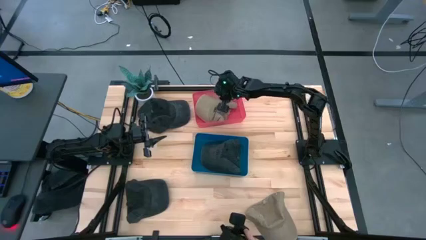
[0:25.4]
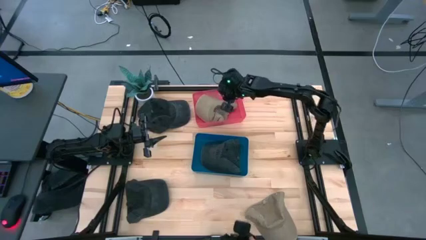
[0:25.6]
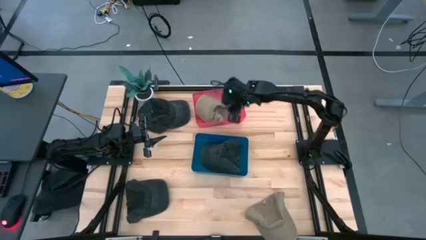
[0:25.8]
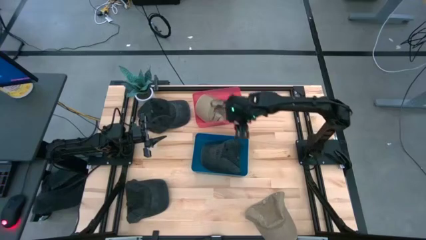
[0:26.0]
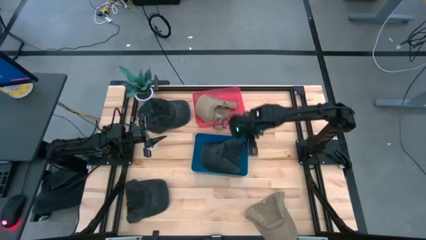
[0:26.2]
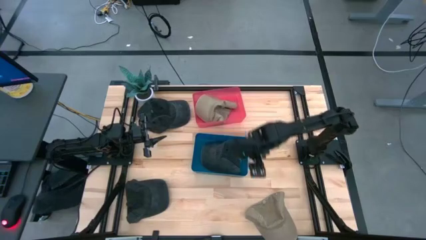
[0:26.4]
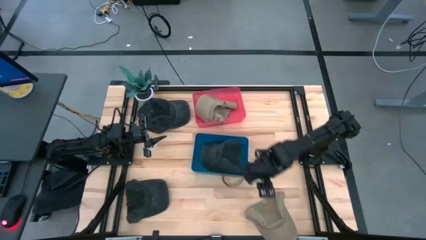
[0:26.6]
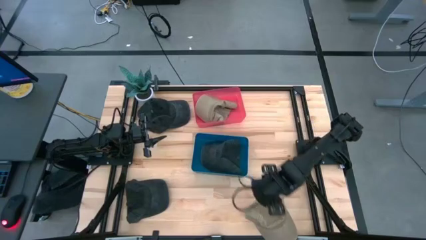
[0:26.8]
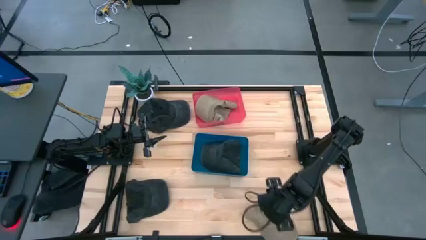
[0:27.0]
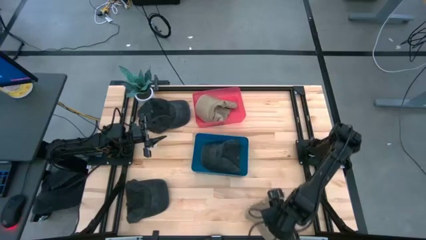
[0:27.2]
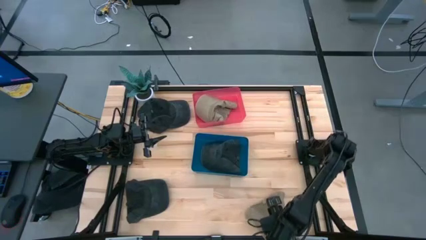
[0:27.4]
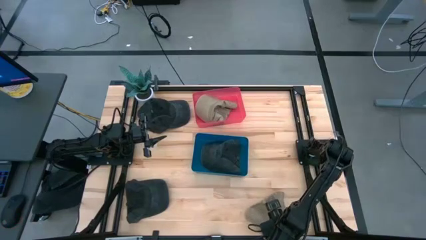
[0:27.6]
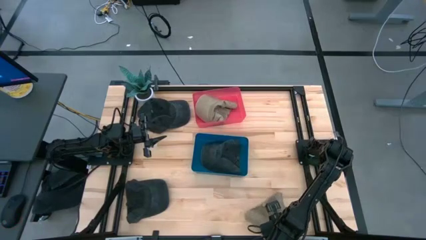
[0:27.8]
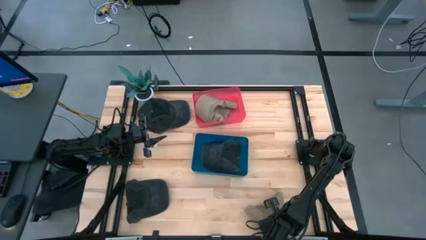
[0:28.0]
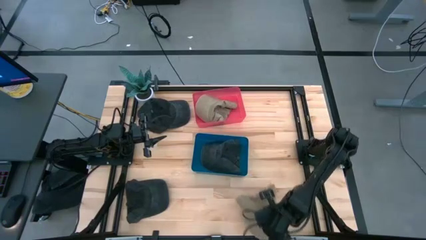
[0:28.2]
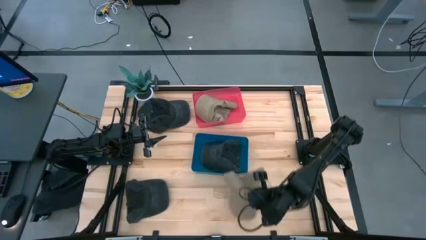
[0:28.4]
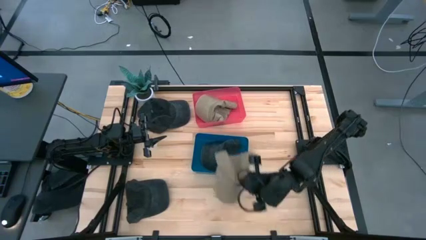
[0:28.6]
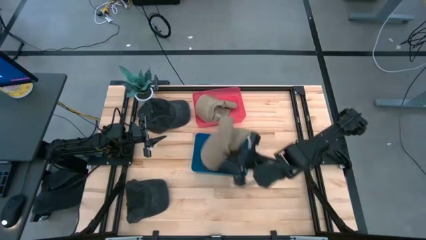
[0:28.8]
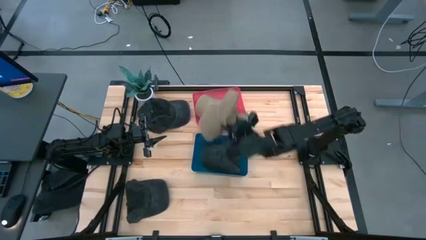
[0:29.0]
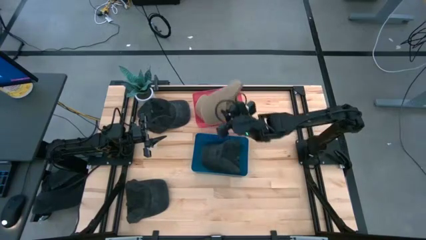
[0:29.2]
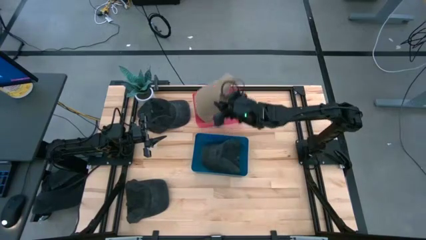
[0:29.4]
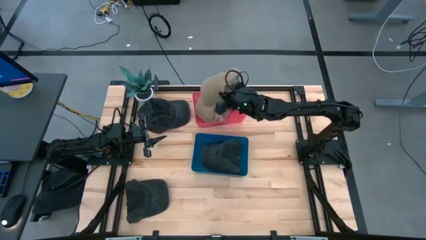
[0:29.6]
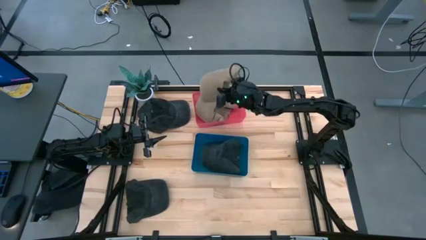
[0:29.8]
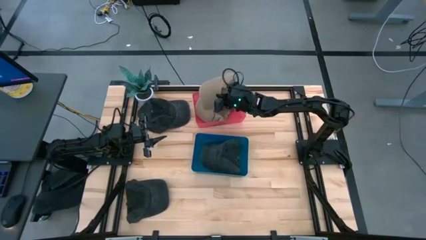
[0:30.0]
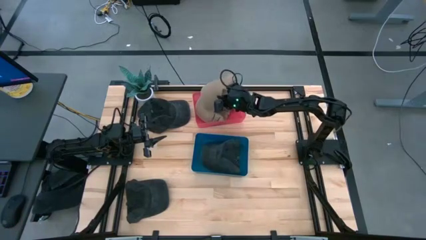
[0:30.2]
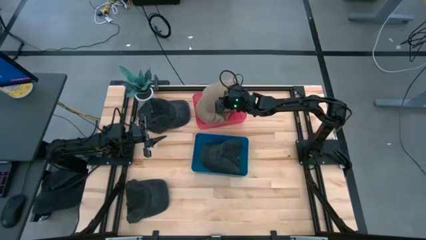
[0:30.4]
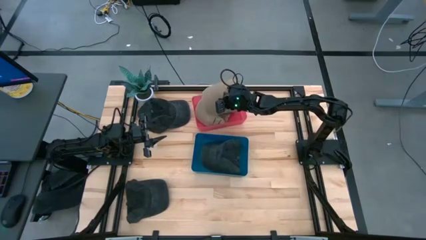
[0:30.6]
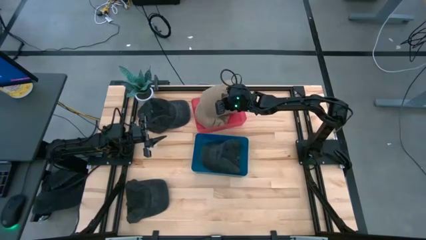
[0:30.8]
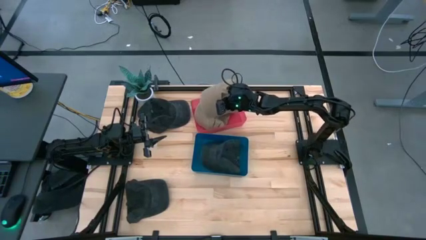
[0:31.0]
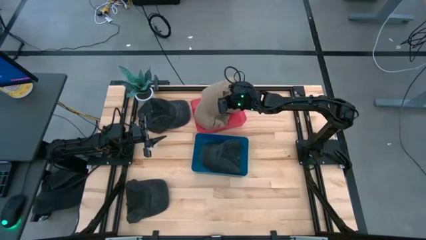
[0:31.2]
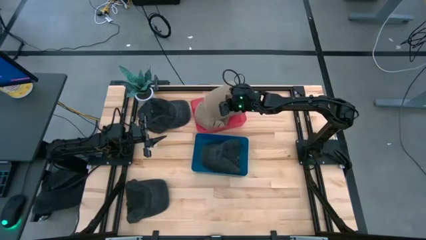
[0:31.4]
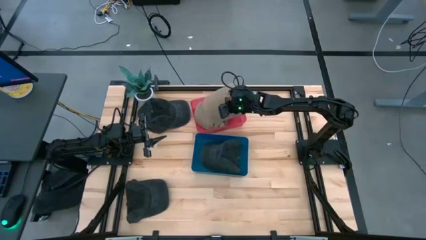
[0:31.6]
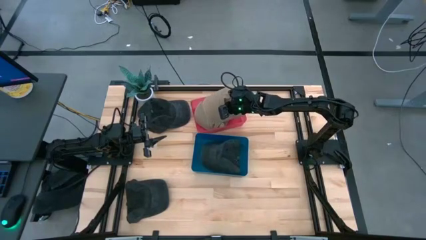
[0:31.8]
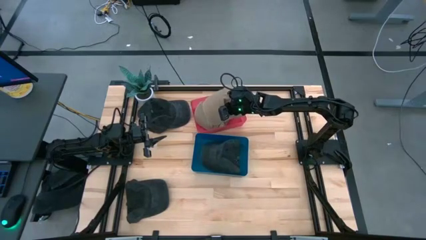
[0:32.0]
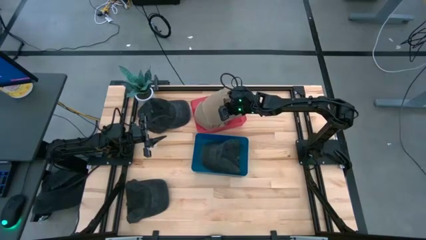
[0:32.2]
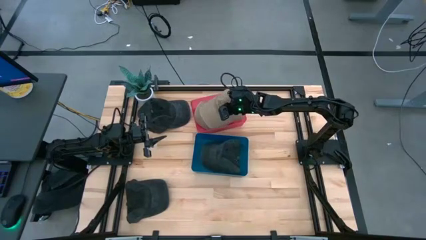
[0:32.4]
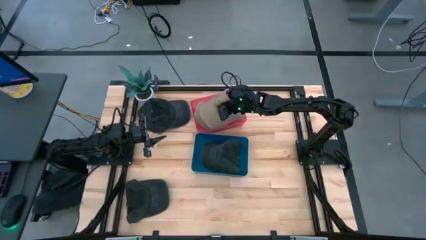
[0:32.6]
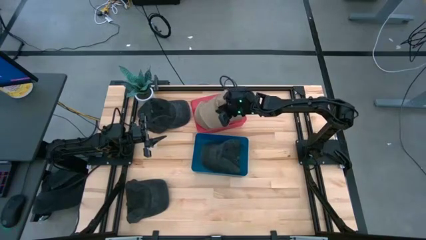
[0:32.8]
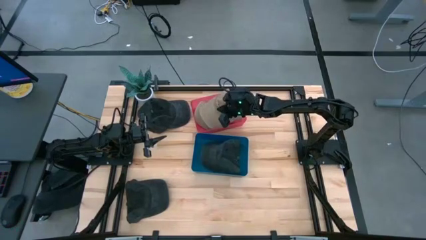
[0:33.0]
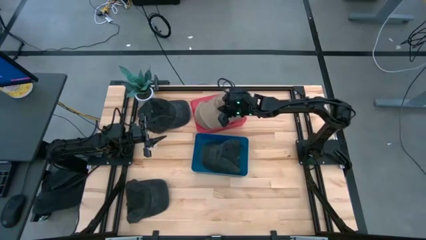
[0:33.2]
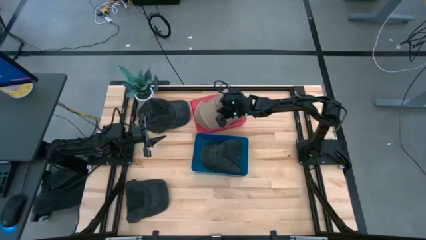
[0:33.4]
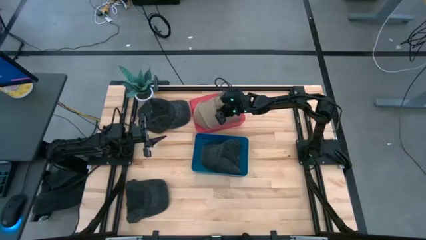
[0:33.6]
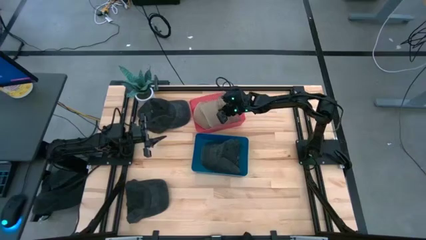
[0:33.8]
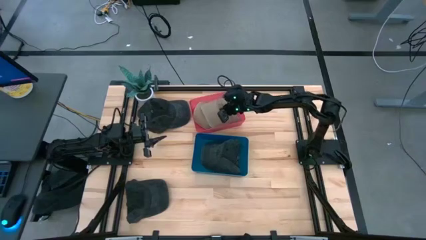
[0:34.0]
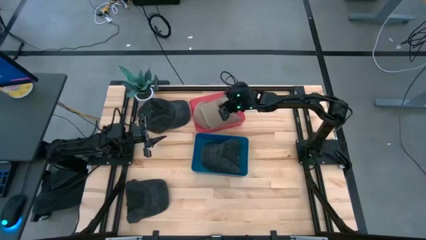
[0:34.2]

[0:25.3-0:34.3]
Task: Pick & Place hat
Put the brown cap into the red bin

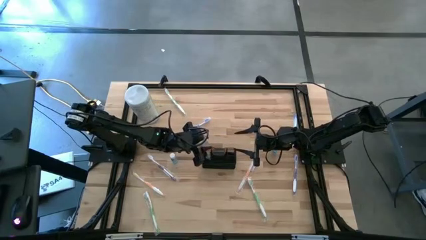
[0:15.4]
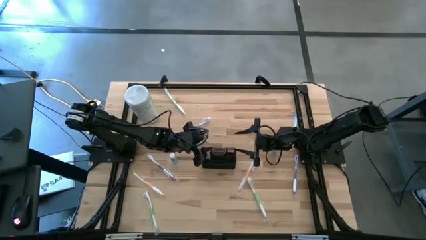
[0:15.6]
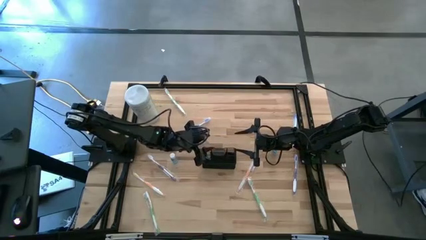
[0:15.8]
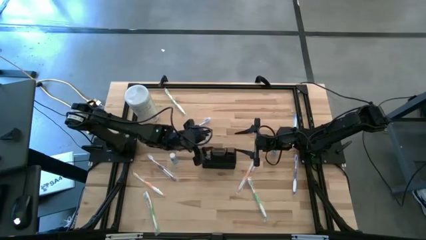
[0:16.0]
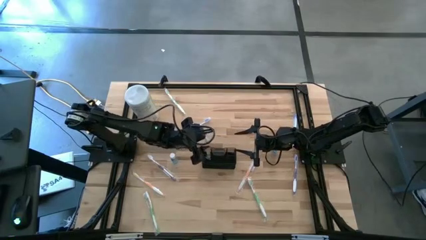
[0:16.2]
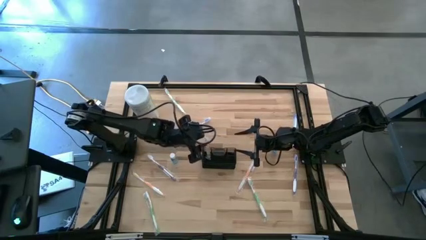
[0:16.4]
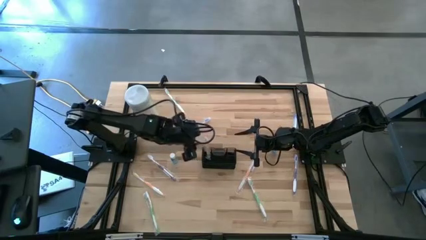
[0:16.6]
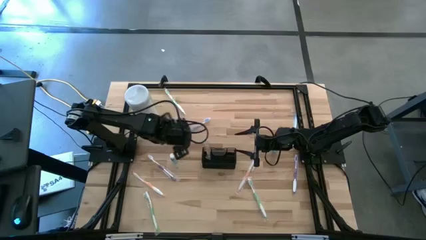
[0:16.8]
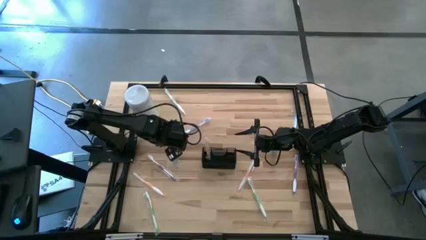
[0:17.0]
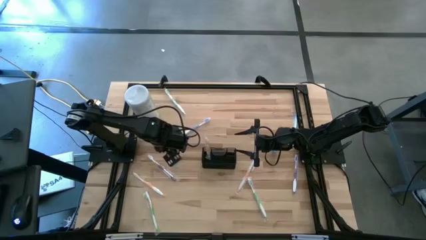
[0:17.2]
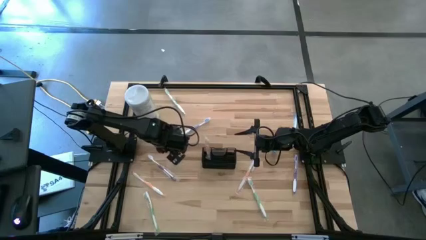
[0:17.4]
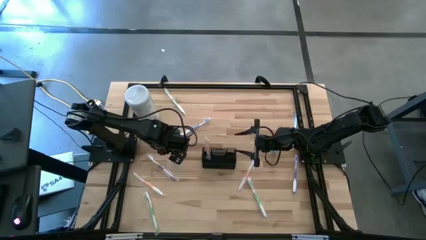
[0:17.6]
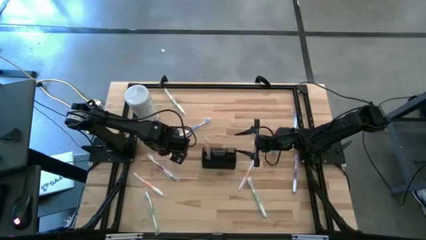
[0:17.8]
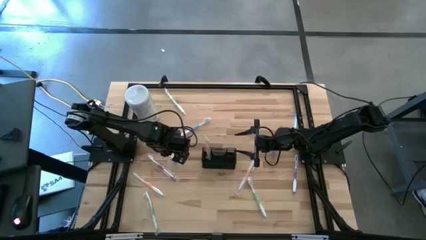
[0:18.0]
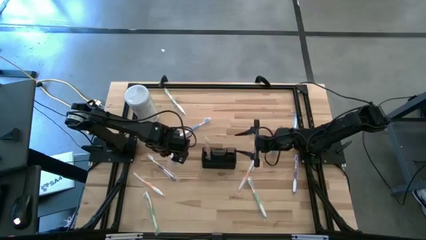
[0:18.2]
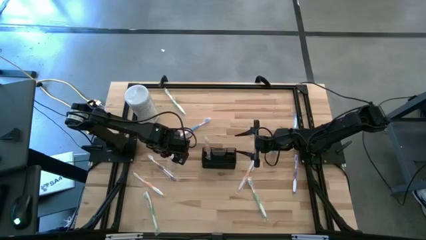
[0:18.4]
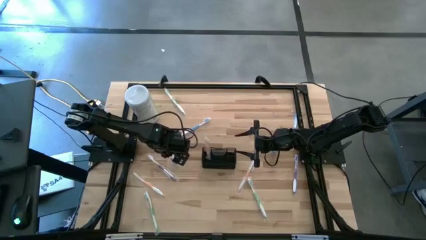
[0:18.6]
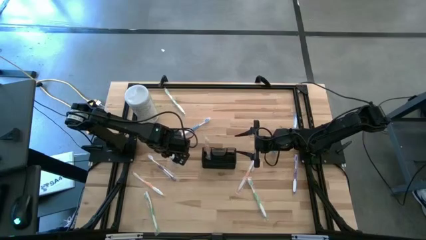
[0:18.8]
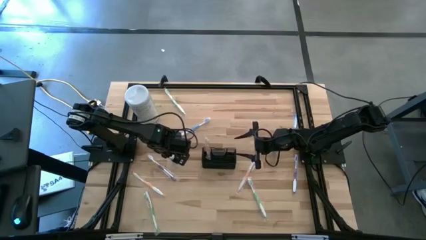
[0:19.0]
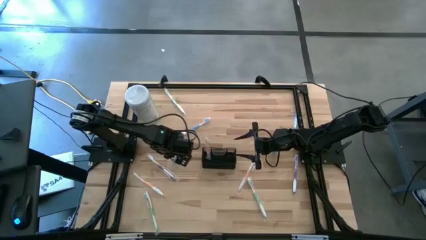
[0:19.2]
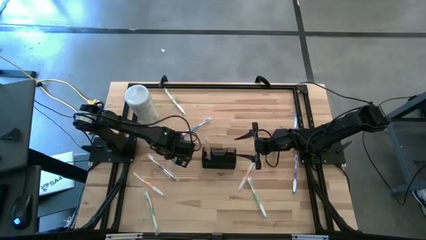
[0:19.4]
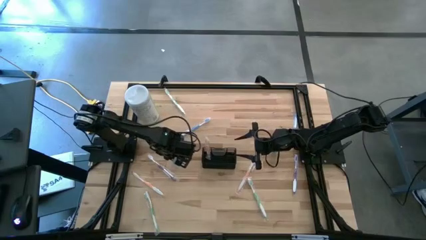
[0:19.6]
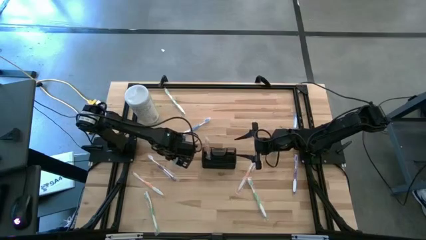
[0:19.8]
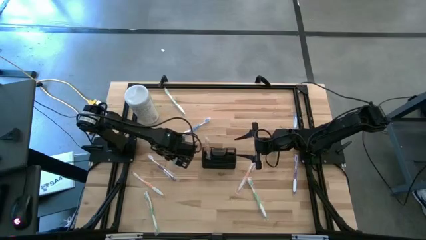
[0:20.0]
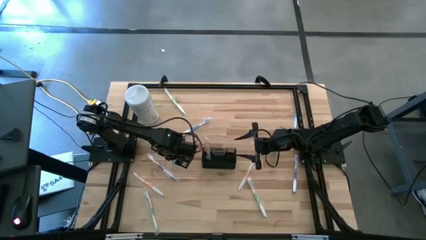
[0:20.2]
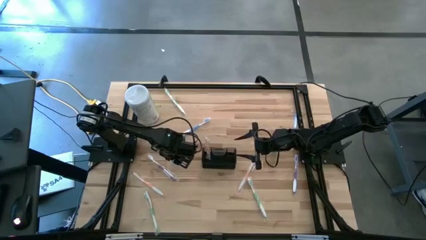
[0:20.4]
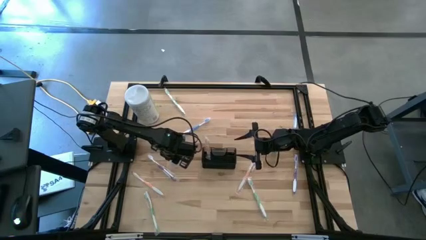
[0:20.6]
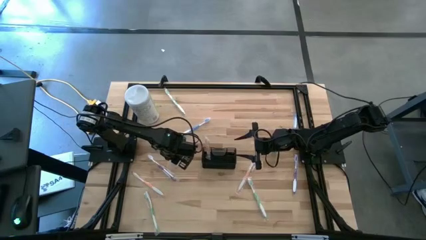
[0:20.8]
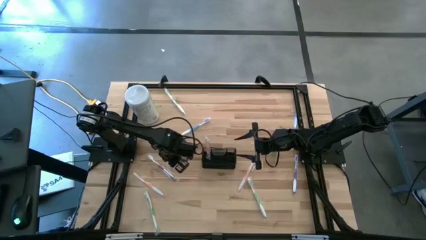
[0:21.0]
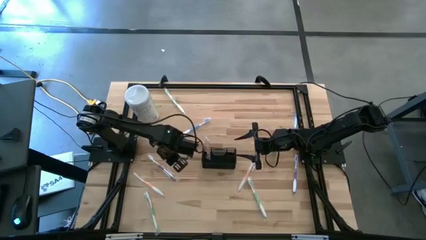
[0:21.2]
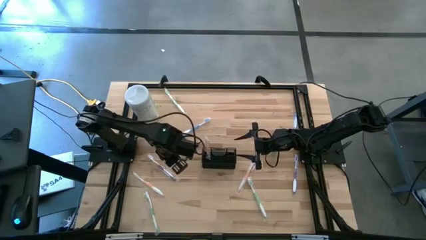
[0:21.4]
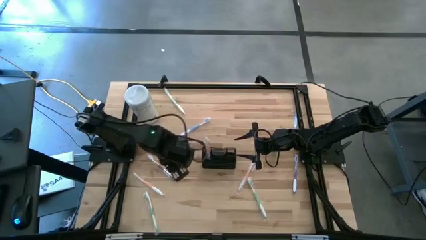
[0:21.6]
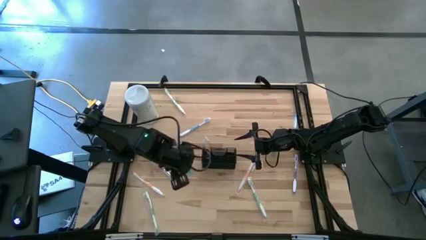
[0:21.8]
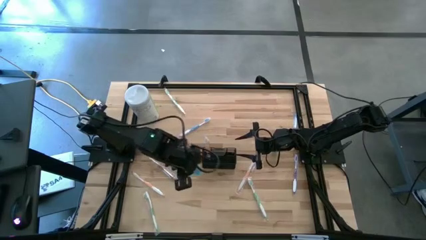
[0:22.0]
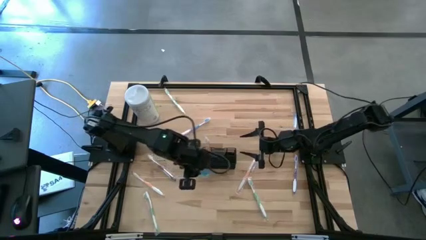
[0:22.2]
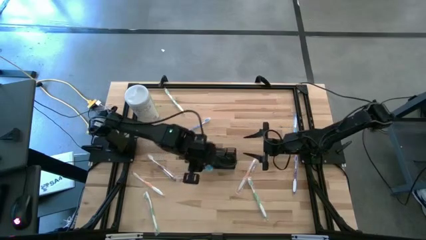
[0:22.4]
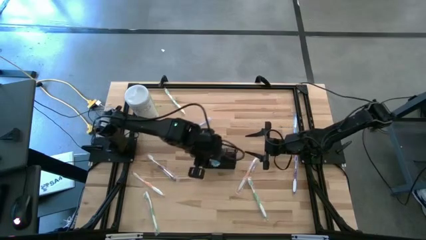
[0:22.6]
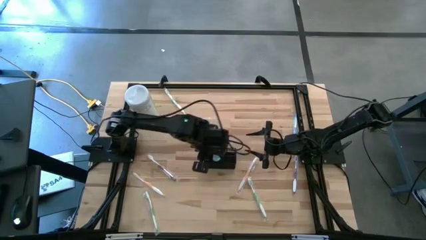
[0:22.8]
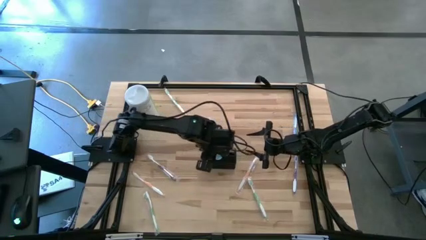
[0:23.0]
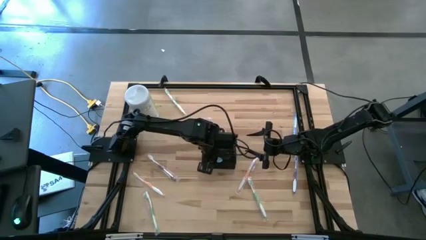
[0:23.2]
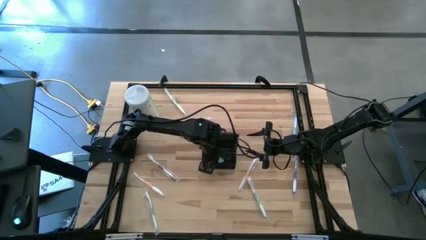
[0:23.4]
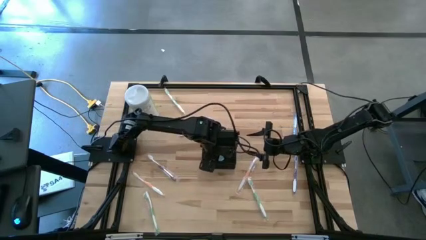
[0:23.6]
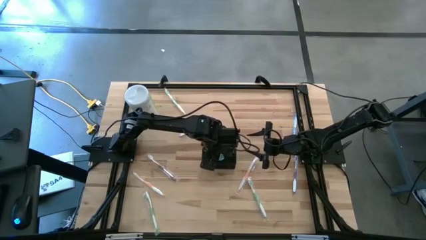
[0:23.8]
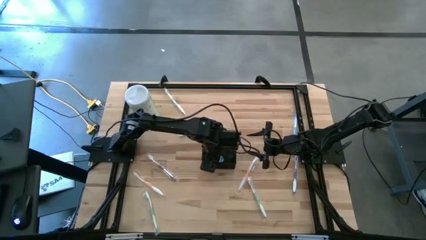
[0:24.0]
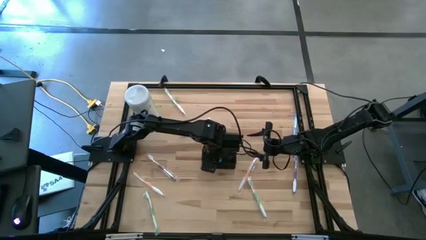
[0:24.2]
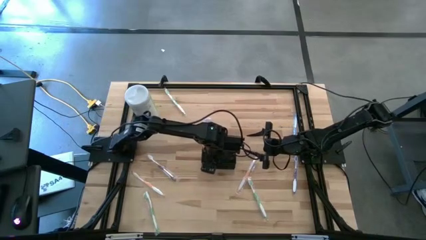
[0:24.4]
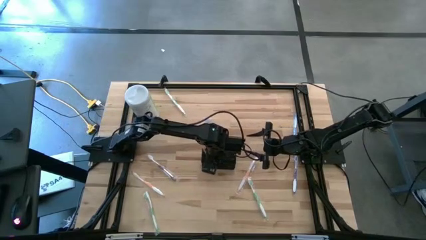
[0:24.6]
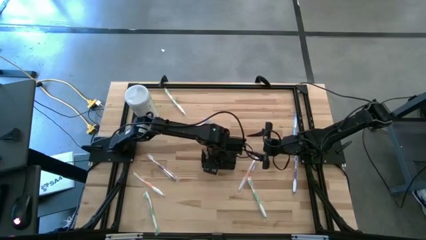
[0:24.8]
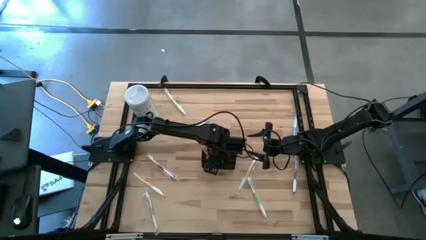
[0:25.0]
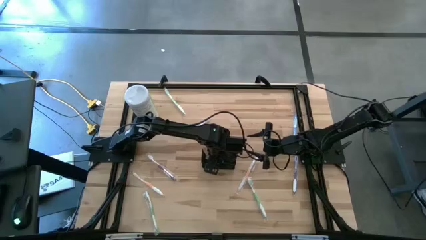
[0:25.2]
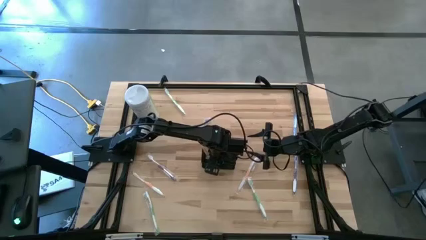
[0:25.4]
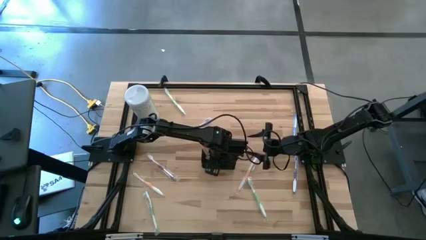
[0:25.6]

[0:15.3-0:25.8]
Task: Pick & Place toothbrushing station
Put the left blue mouthwash bottle into the mesh organizer
